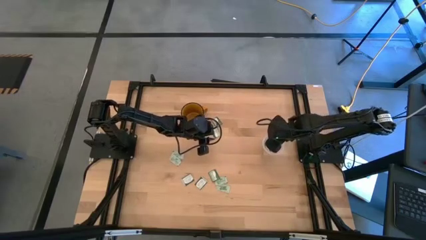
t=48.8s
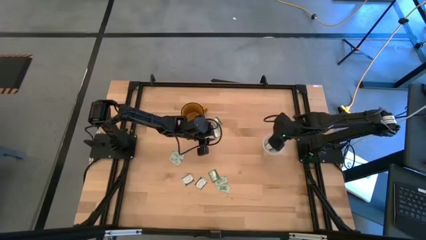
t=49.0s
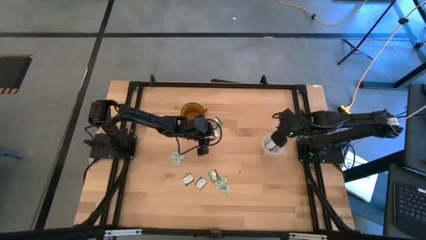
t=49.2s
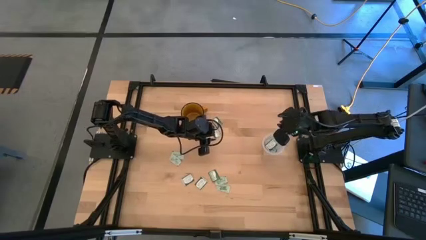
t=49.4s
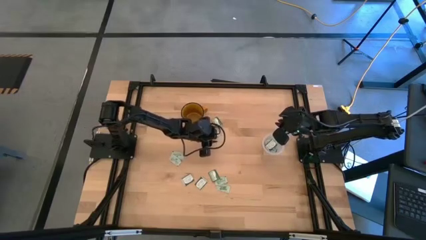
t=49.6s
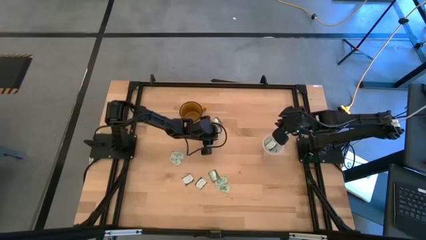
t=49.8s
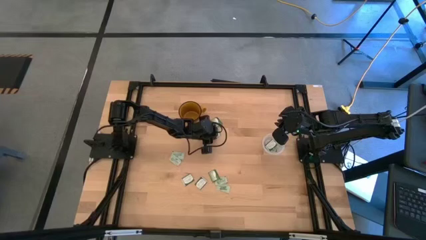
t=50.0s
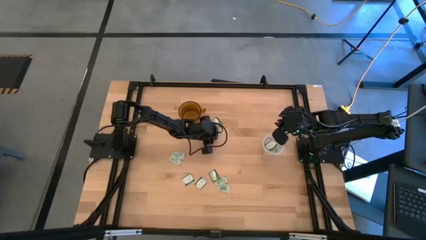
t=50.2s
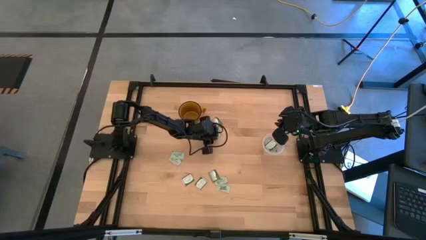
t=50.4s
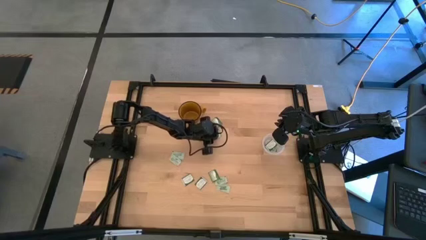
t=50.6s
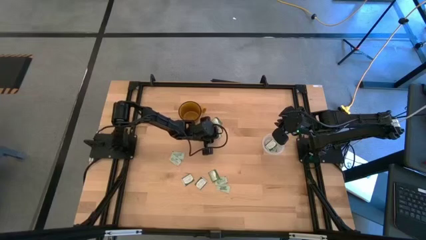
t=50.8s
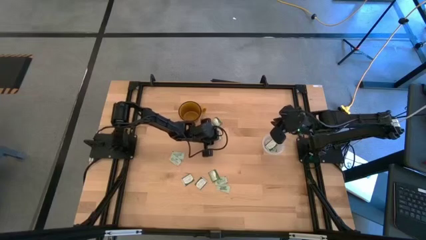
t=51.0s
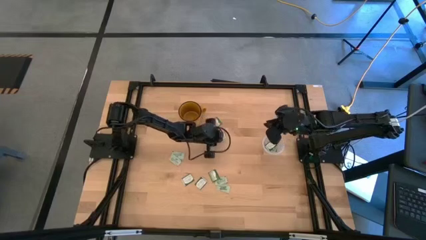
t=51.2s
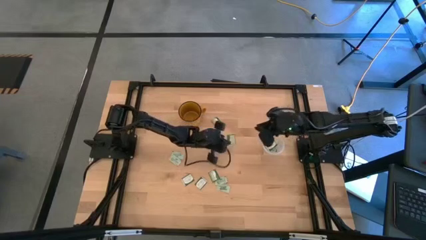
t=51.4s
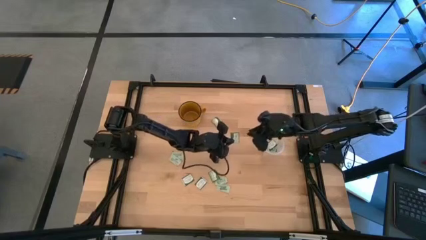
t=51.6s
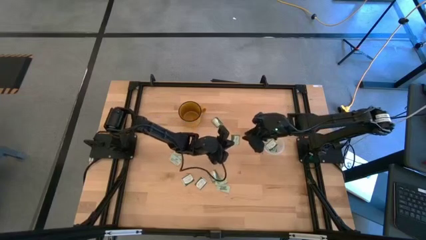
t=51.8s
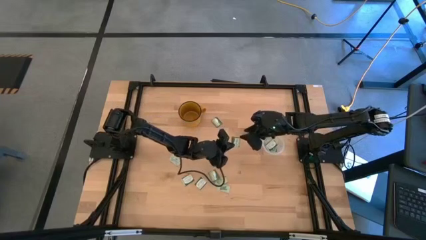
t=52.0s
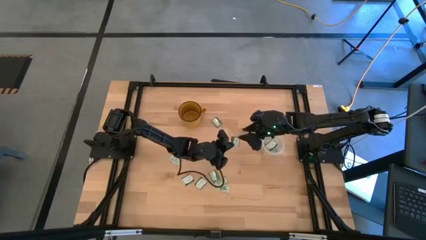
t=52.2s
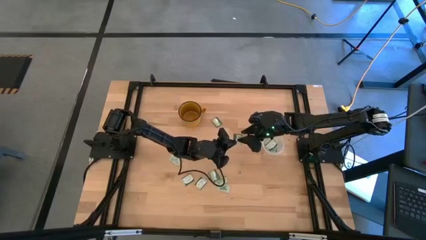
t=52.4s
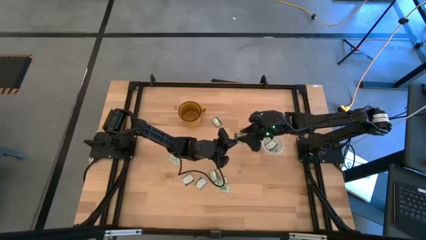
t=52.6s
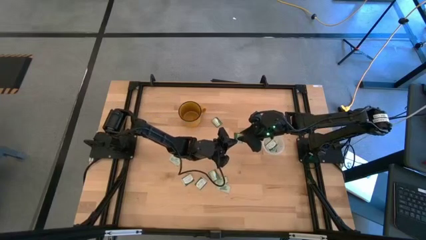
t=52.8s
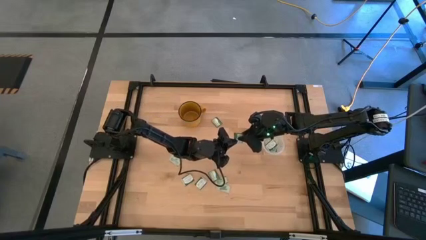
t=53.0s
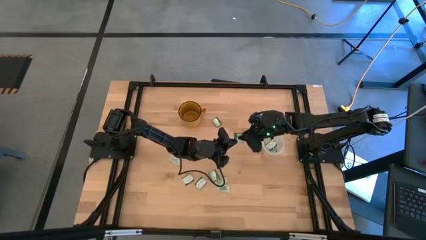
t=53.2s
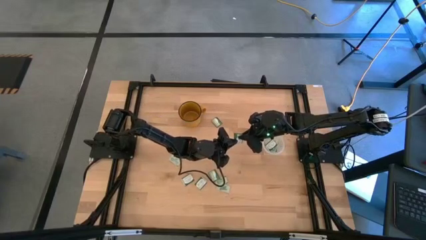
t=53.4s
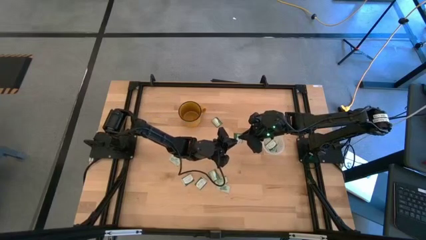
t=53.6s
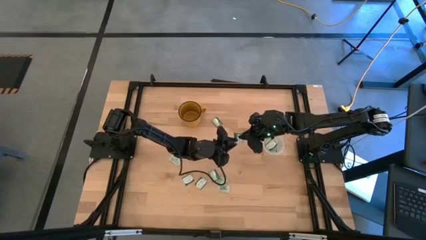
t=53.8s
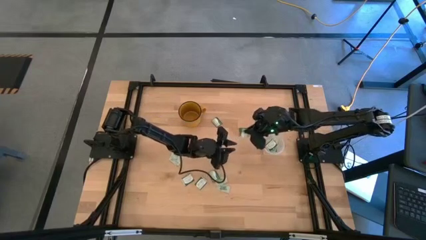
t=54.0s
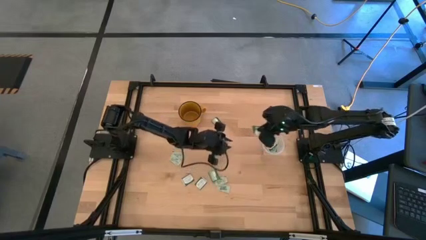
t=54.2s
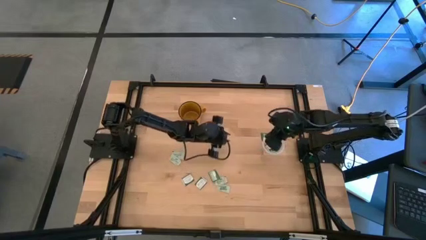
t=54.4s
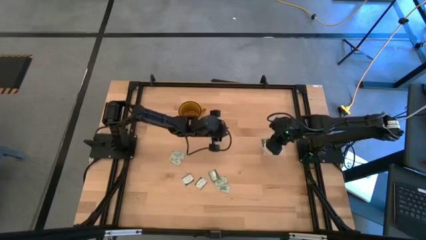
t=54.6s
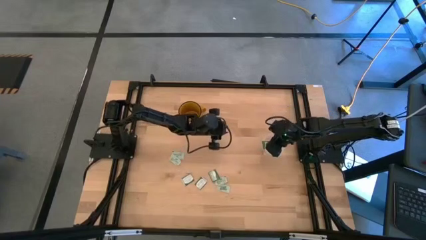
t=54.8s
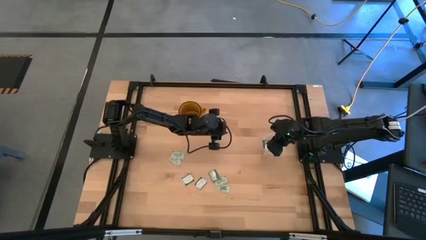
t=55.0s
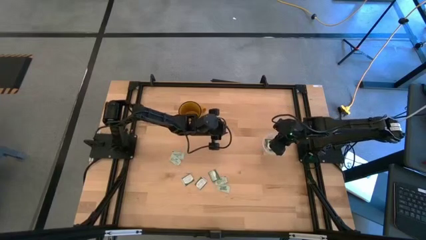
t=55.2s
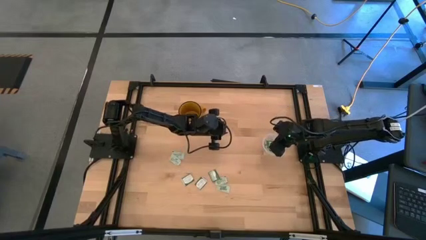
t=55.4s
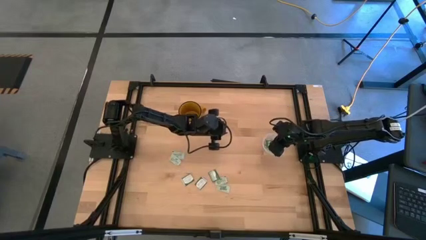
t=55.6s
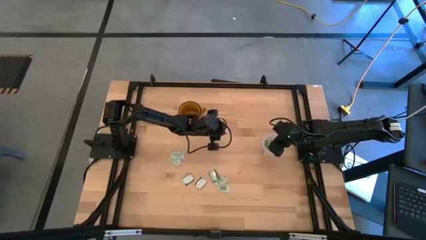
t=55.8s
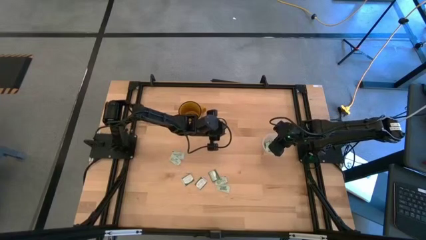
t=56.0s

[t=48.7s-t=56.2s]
Task: Pick and place items into bin
Put the truvia packet into the transparent bin

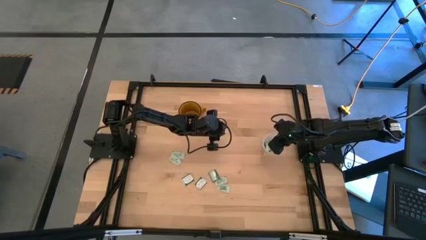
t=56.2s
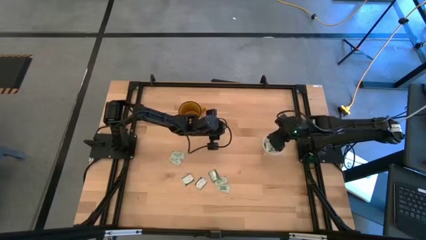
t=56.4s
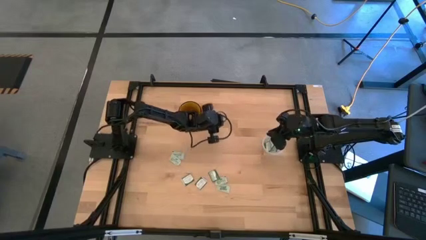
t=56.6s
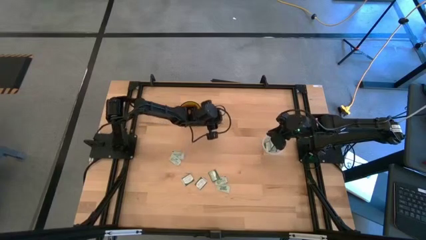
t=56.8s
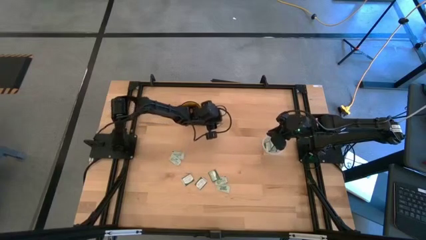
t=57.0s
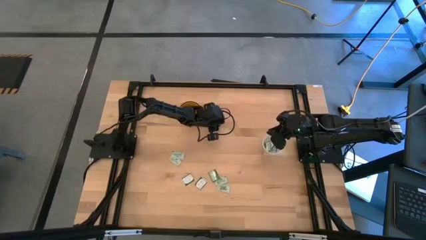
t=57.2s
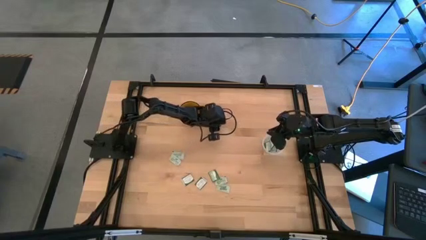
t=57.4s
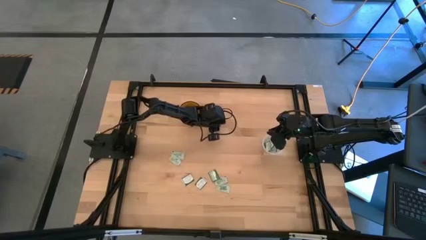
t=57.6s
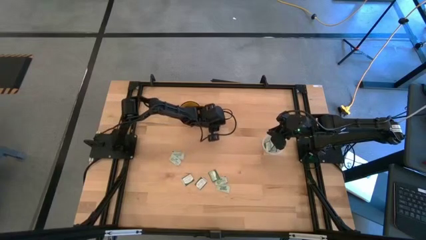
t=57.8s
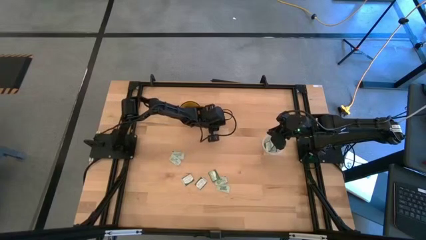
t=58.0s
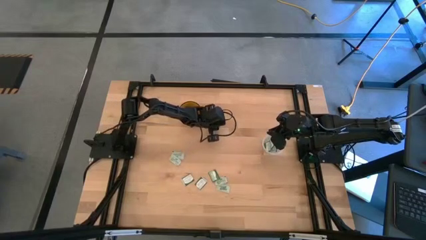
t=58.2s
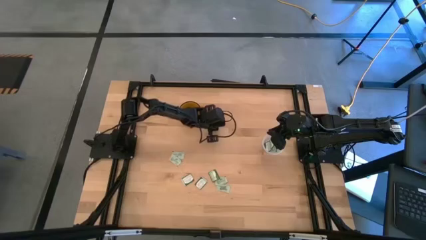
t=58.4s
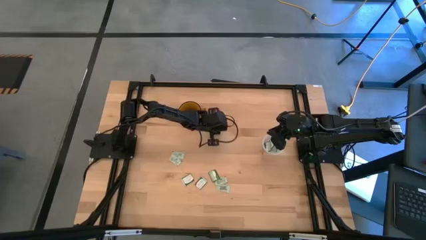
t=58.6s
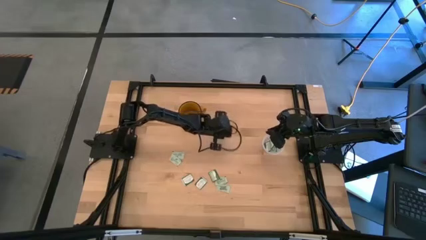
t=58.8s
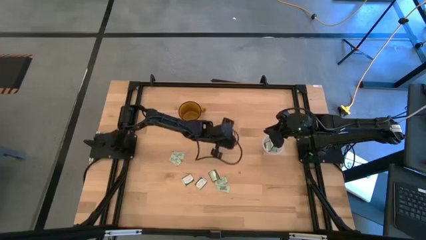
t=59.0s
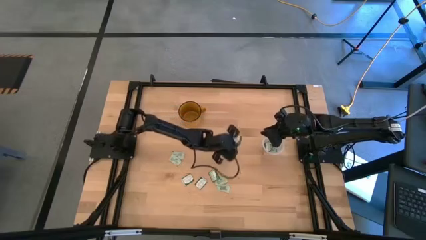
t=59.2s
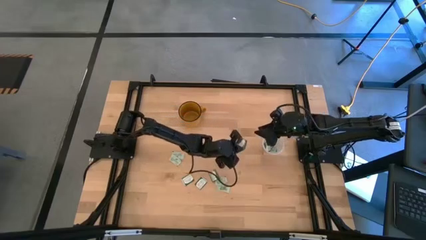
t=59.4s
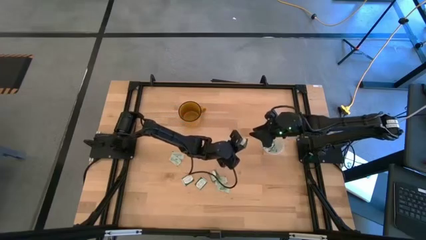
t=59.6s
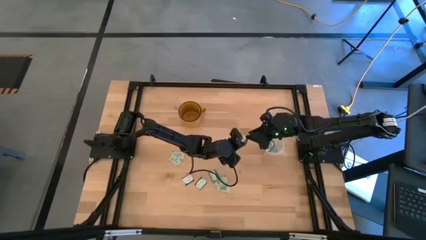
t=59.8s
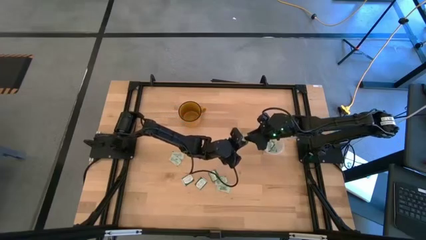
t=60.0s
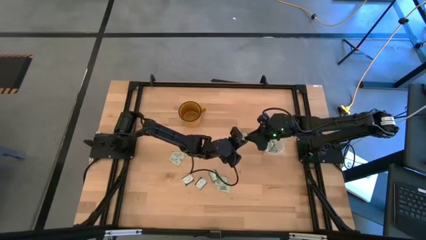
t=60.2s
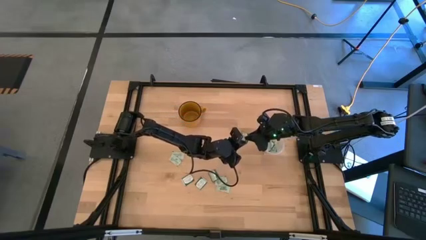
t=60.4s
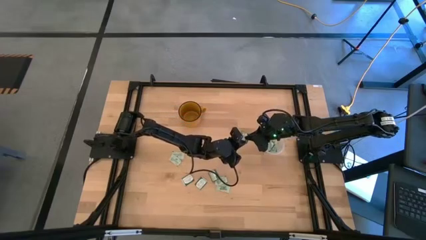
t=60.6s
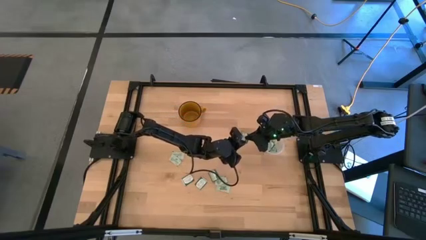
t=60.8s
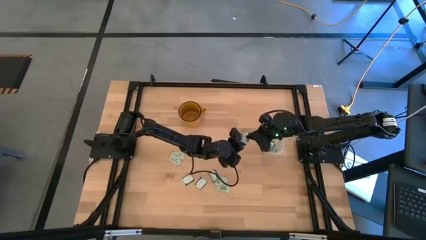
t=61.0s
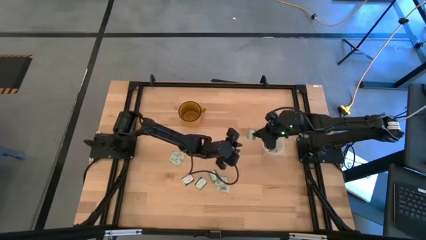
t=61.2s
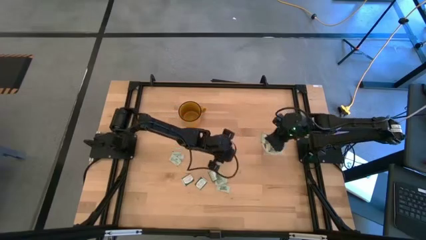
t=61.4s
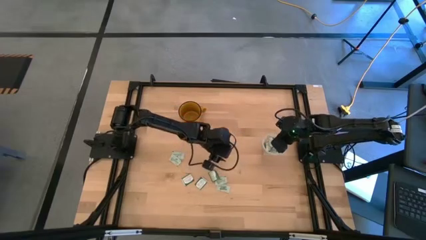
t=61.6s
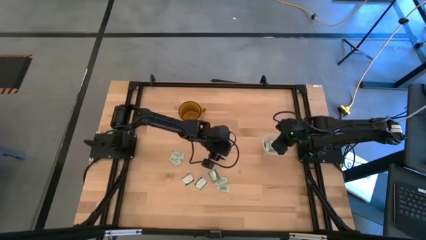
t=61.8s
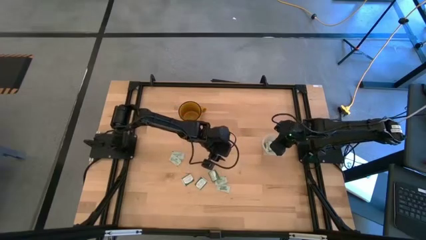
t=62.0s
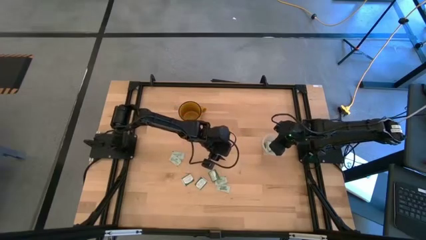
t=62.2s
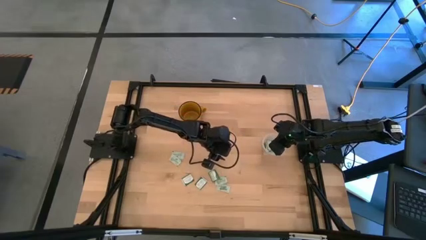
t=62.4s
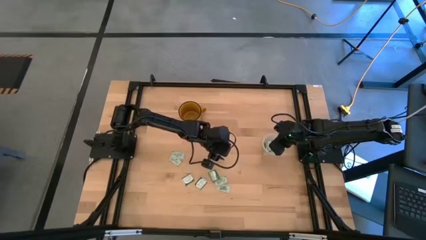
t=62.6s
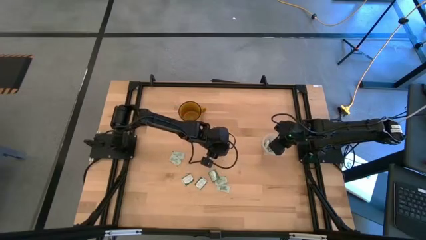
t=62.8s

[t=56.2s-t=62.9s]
Put the truvia packet into the transparent bin

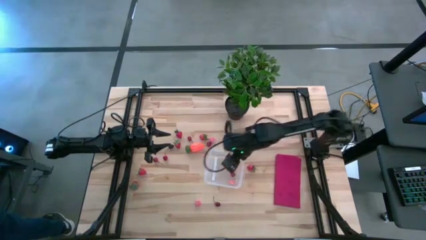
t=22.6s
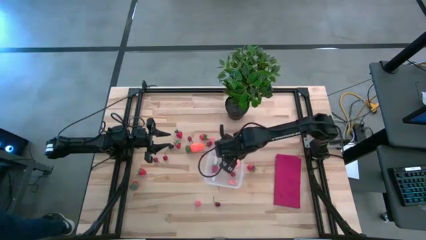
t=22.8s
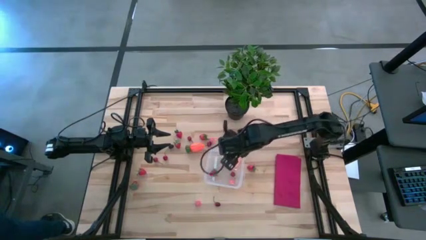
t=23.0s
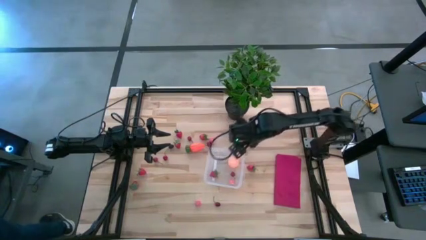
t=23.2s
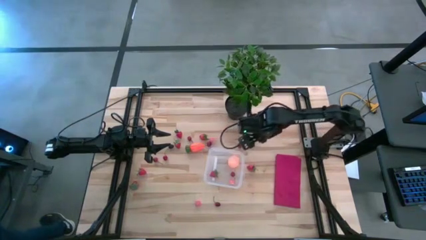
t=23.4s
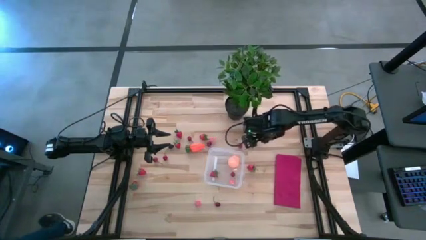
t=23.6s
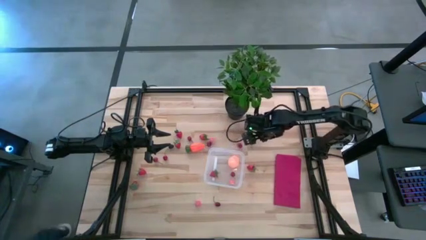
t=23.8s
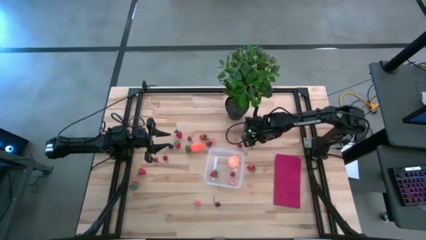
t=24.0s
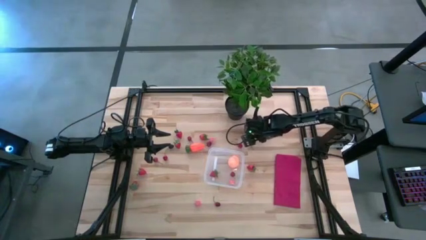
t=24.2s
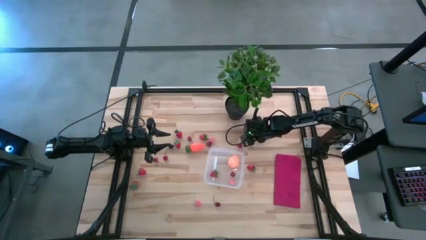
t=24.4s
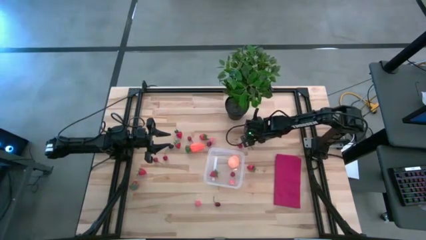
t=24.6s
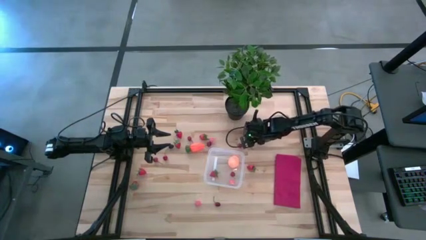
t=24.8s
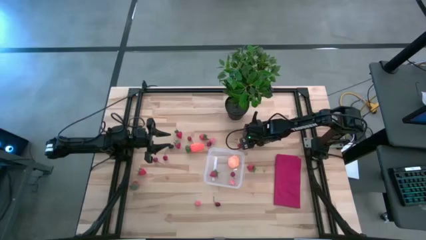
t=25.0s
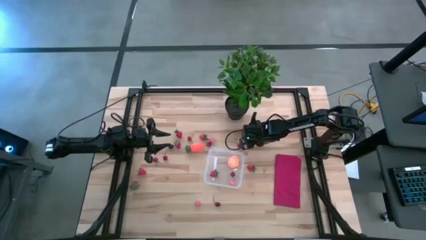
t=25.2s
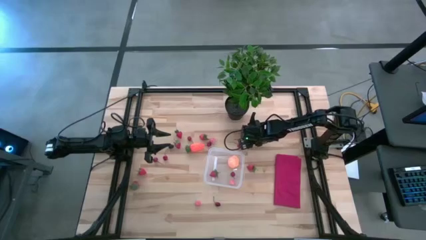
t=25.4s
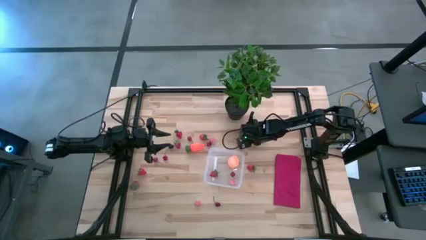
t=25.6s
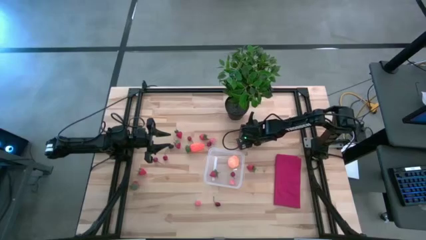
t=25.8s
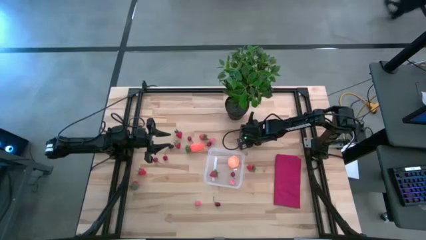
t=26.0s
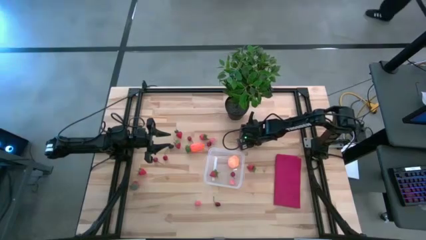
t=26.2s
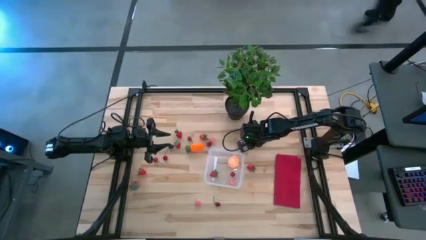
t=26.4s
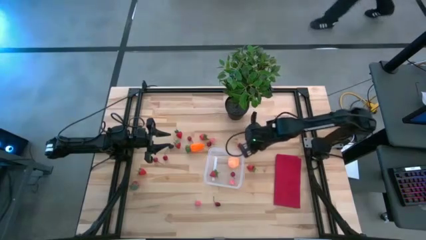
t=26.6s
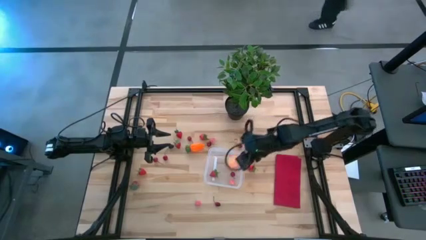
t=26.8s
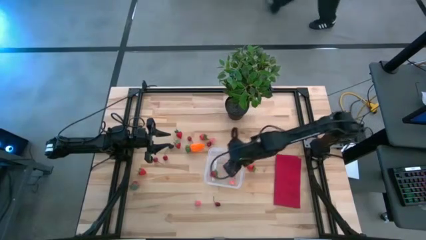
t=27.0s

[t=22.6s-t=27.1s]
Task: Pick and placing Produce into tupperware
Put the red cherry into the transparent bin
